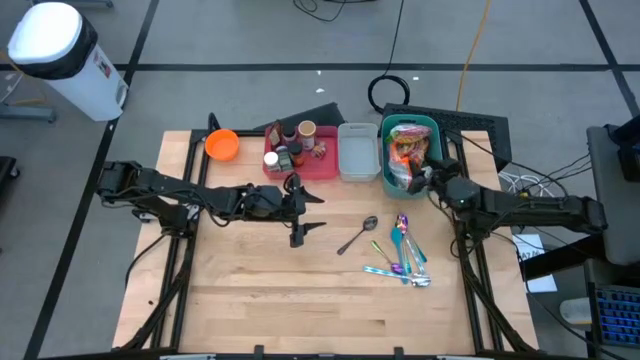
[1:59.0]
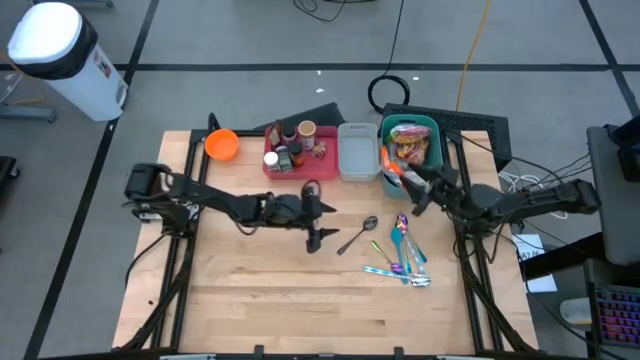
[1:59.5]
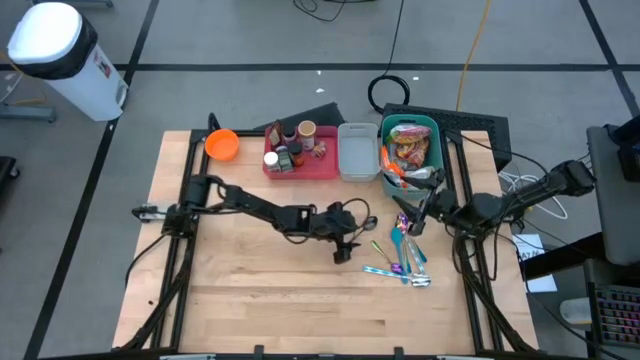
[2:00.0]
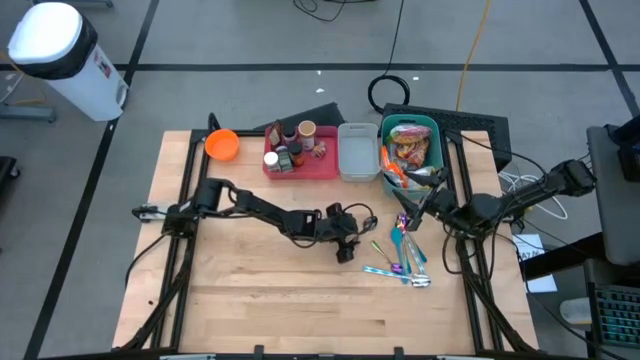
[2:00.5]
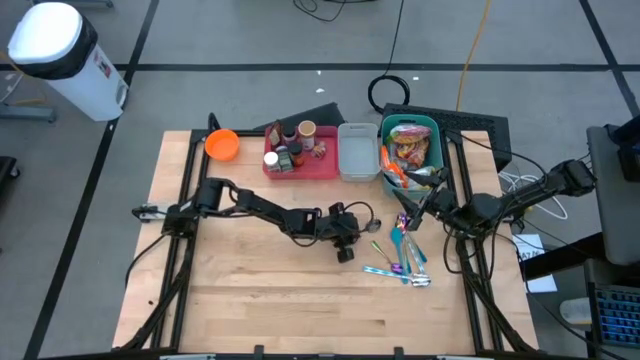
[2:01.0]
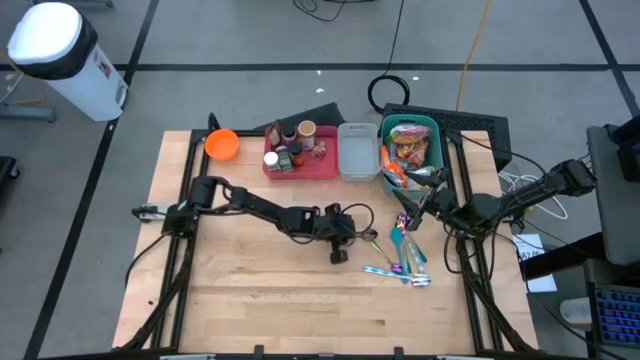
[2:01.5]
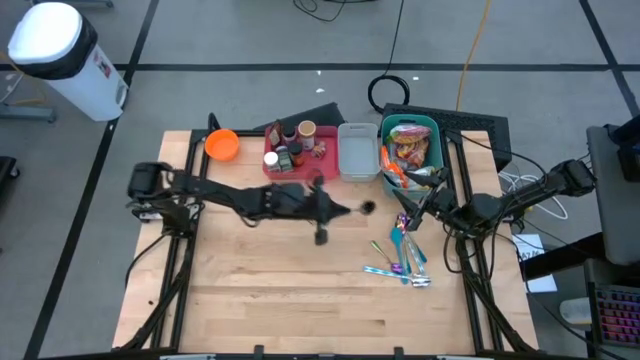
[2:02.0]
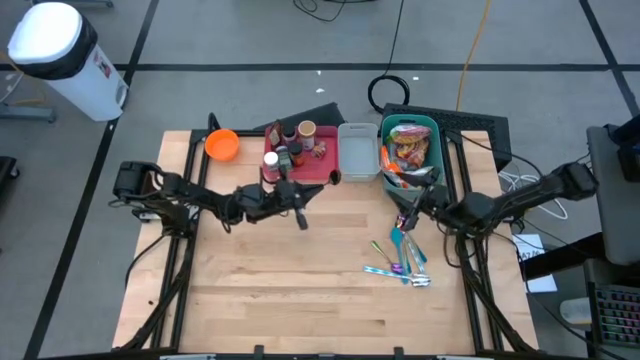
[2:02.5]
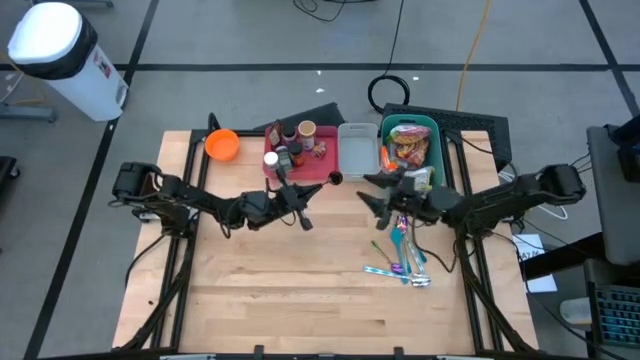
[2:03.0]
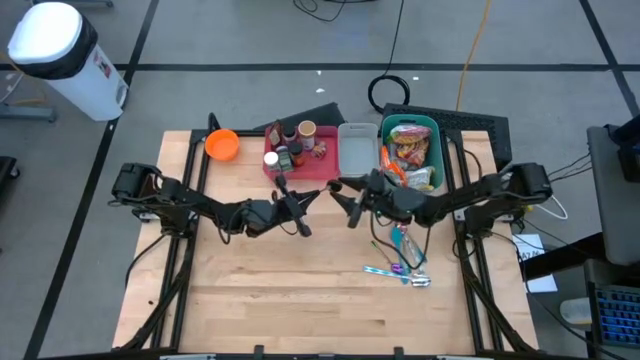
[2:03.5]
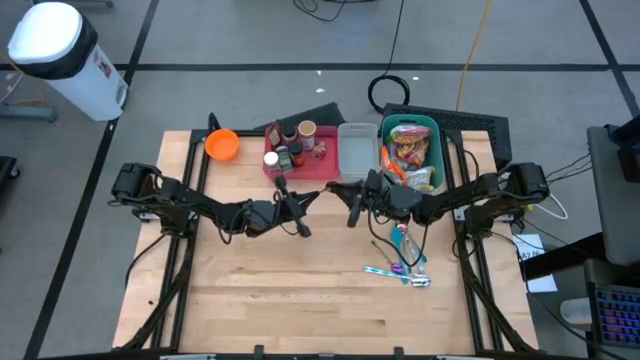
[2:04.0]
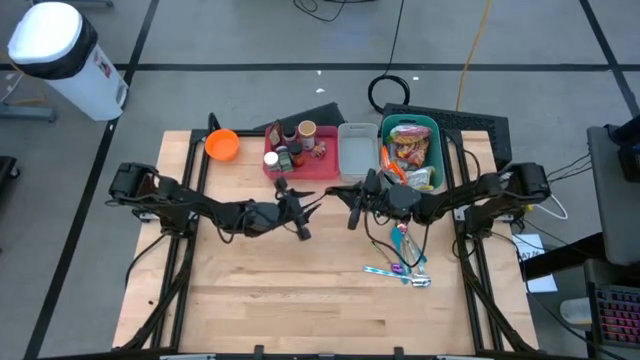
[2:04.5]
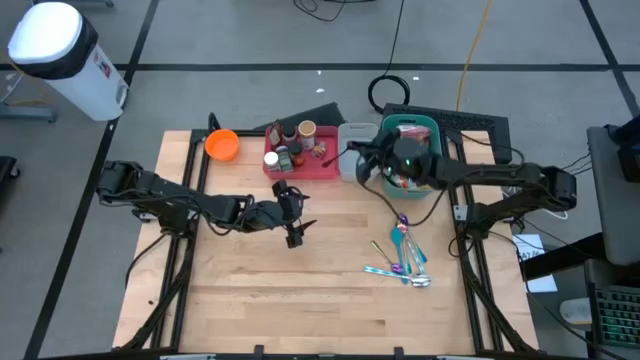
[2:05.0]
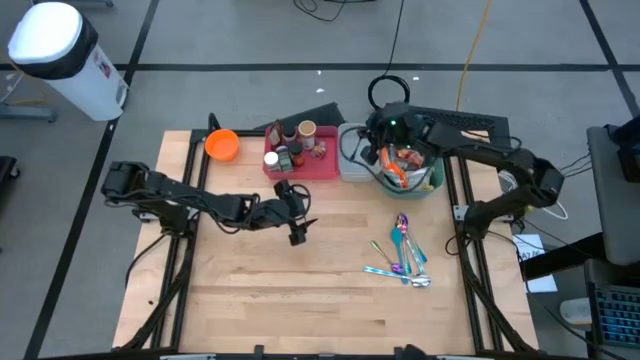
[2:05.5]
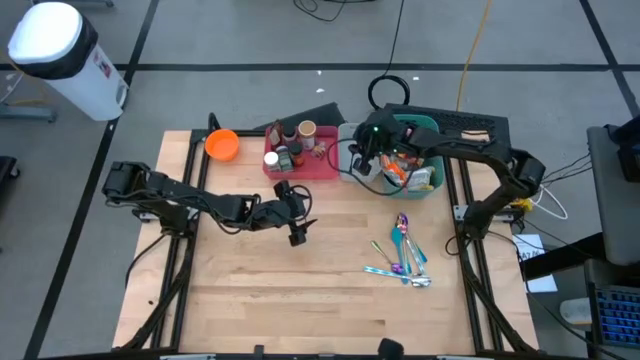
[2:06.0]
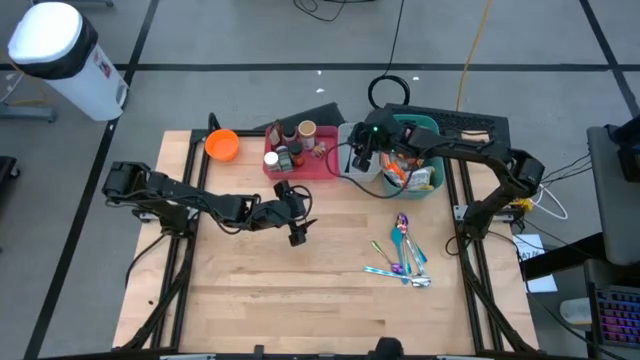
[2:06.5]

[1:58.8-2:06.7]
Task: Pick & Place Food Item
Put the black spoon into the white bin

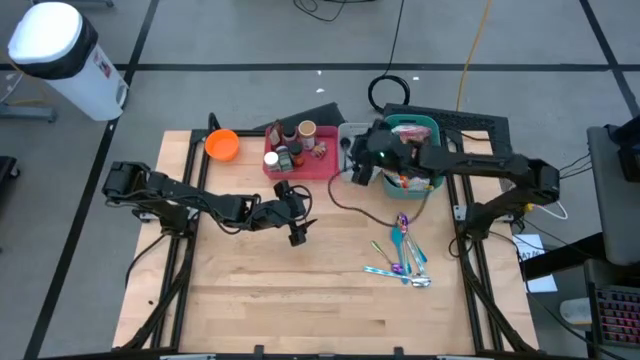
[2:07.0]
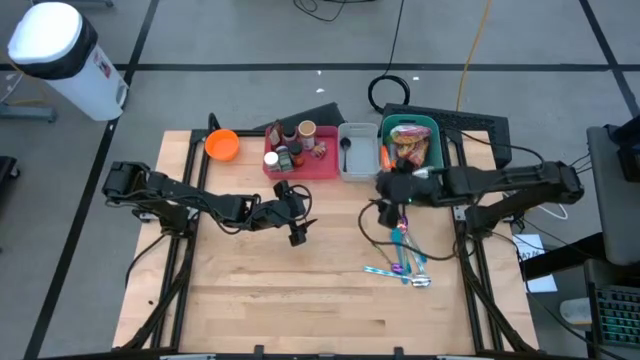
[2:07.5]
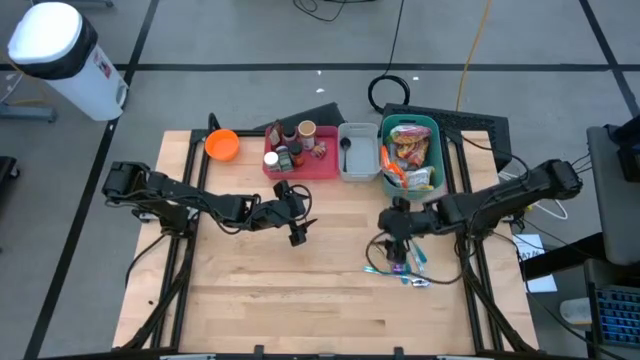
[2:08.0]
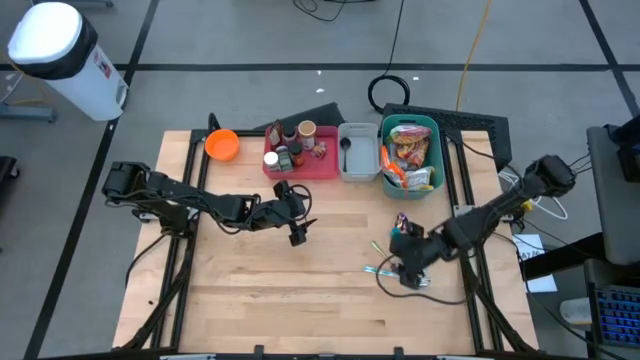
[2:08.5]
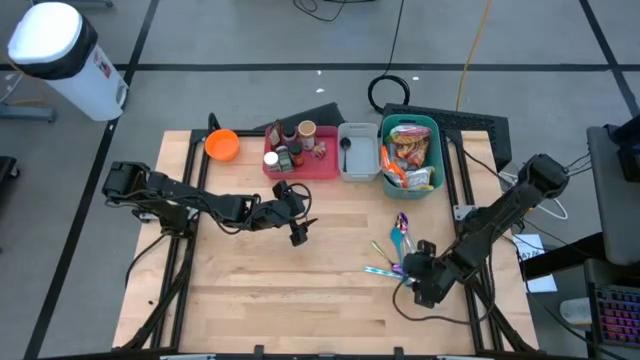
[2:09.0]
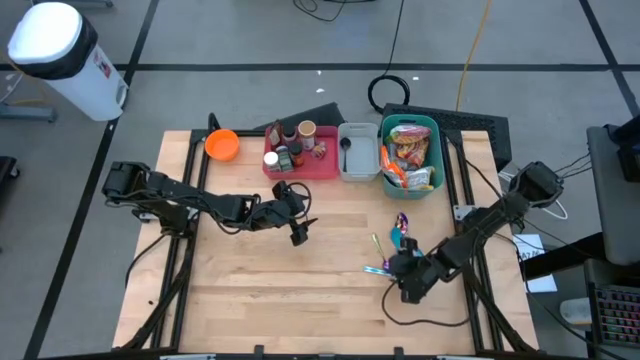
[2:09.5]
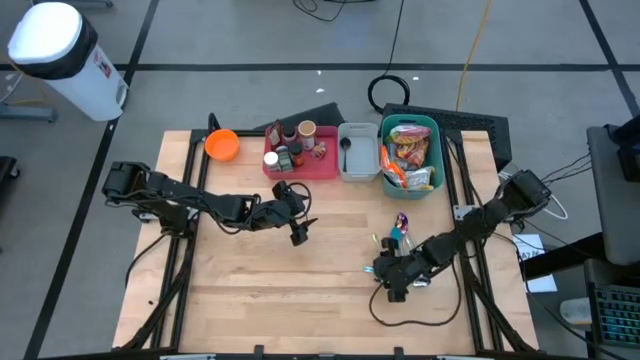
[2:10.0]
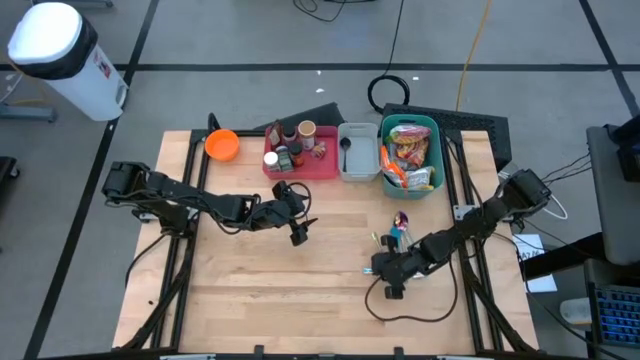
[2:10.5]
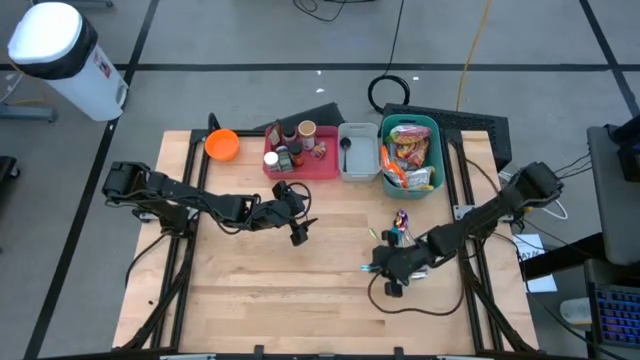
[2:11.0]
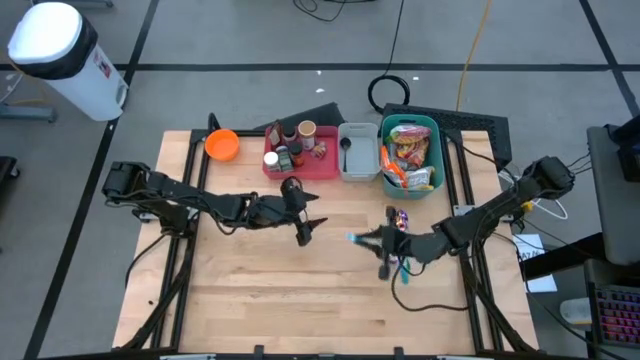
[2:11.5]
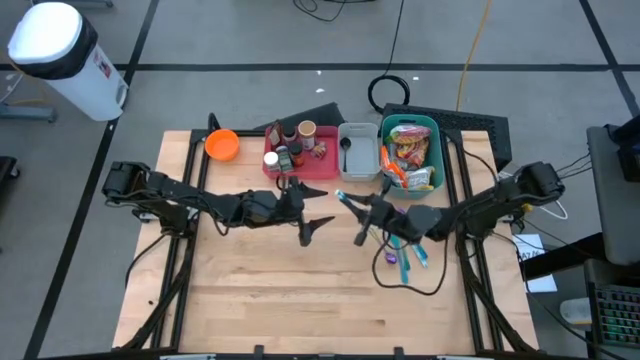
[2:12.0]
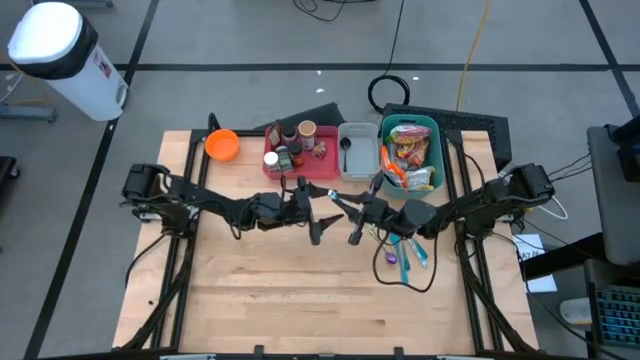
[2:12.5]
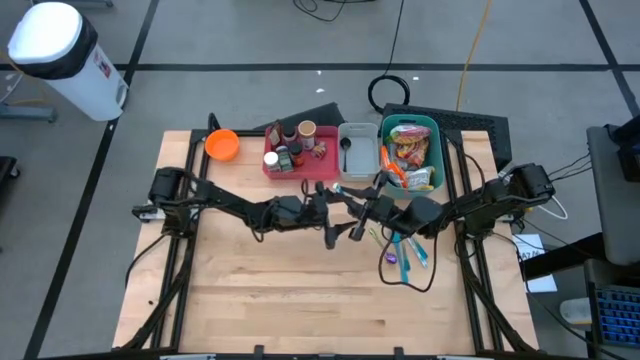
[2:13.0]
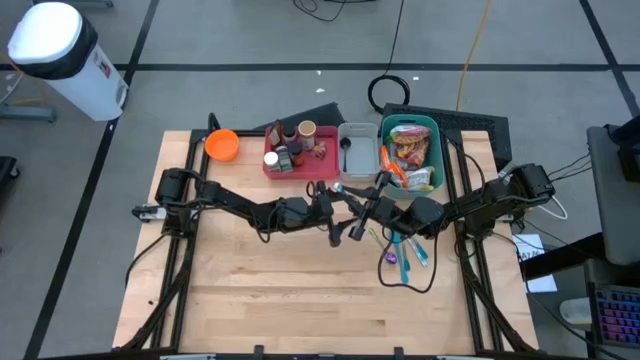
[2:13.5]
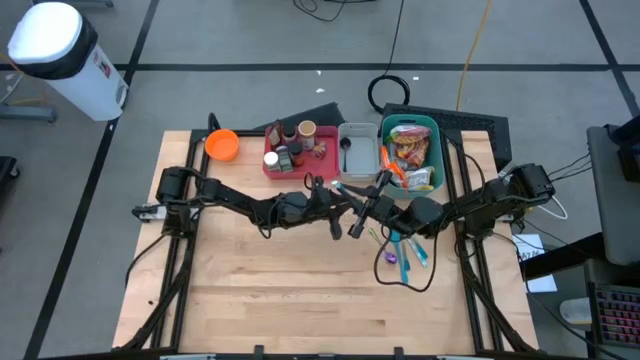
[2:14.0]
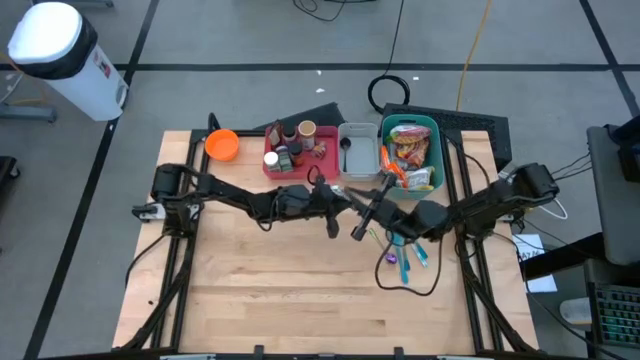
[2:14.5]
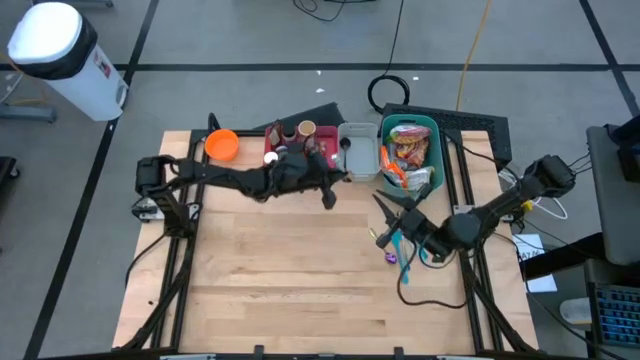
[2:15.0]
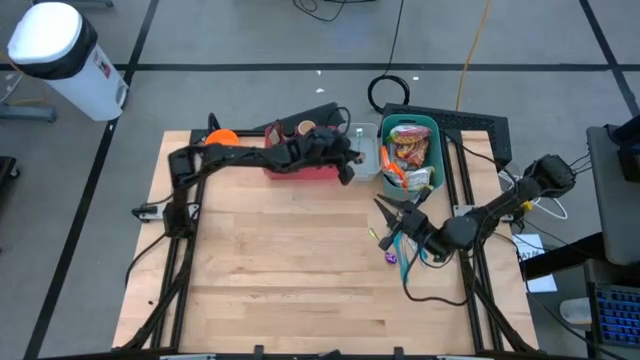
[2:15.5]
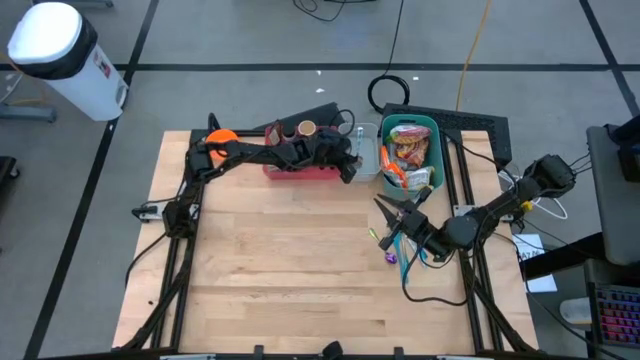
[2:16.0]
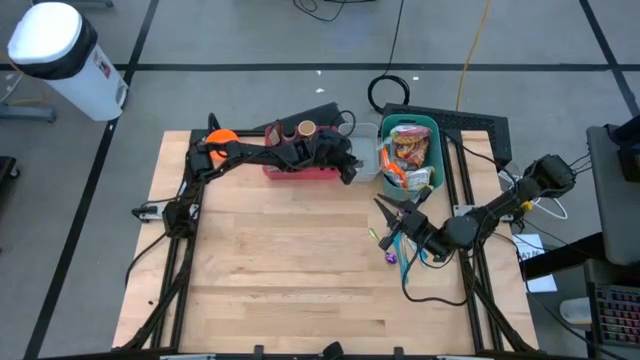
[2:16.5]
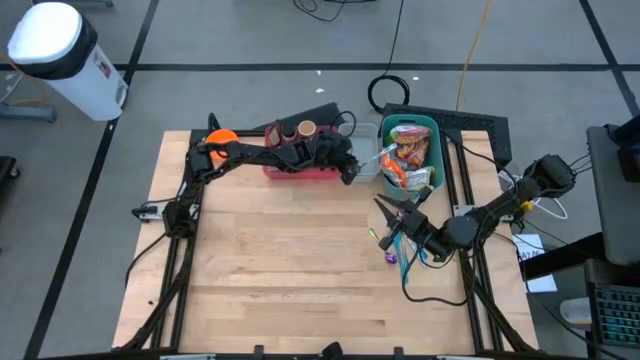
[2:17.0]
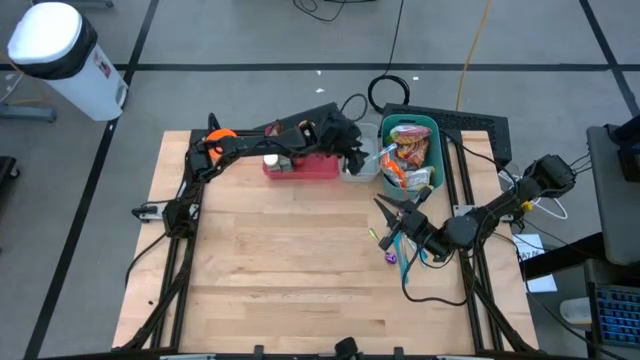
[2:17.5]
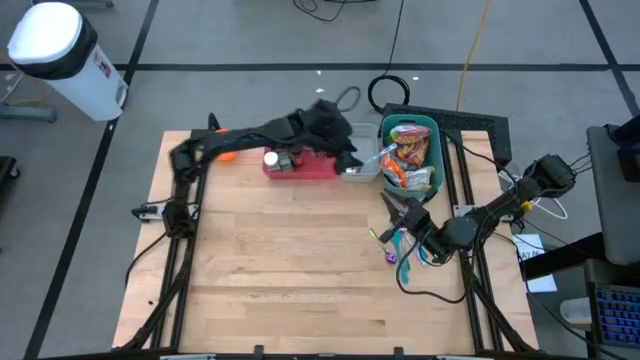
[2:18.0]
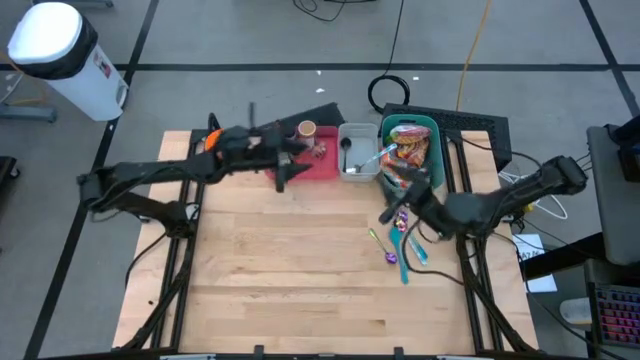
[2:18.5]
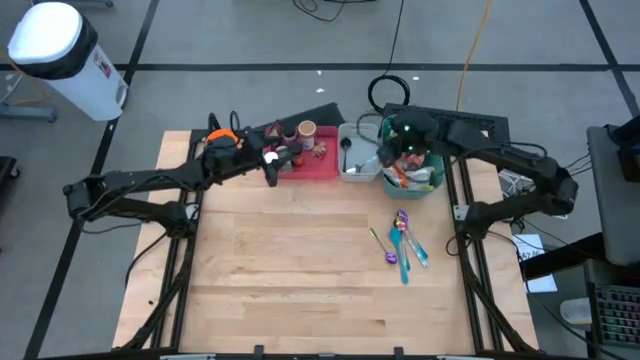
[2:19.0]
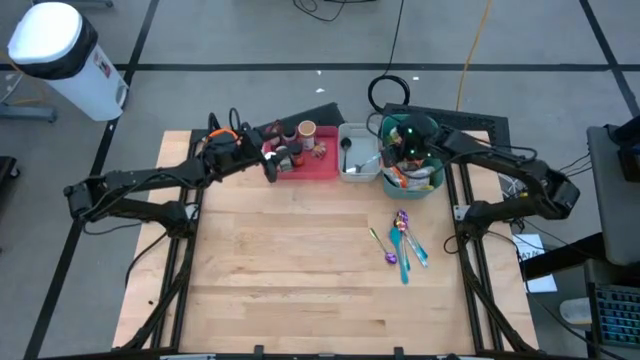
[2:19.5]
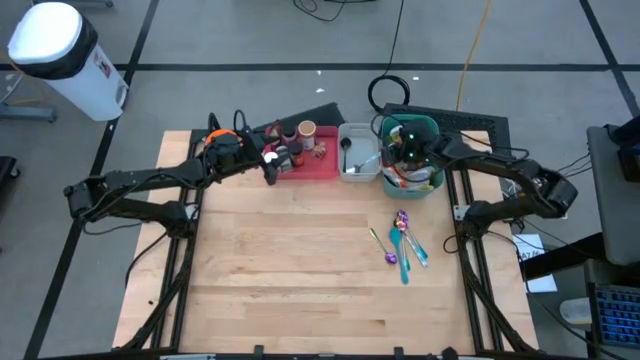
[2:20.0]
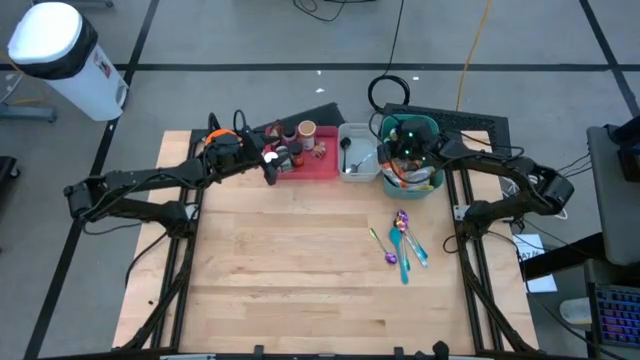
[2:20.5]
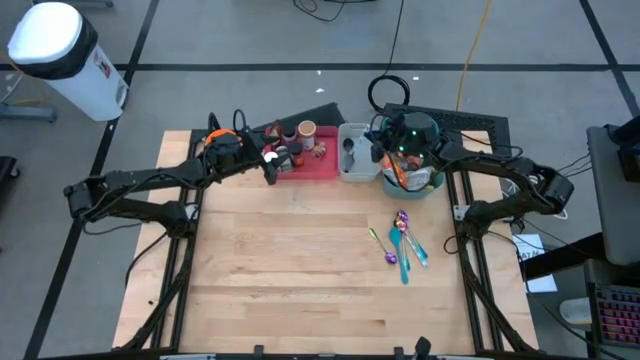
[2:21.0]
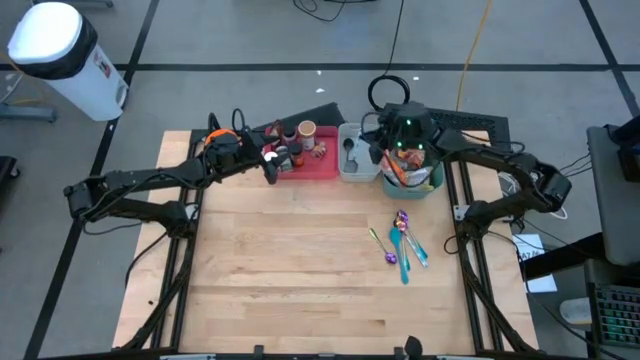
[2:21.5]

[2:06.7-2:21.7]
Put the bottom white and blue spoon into the white bin
